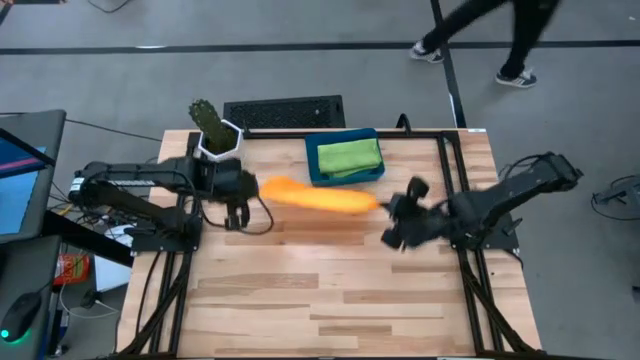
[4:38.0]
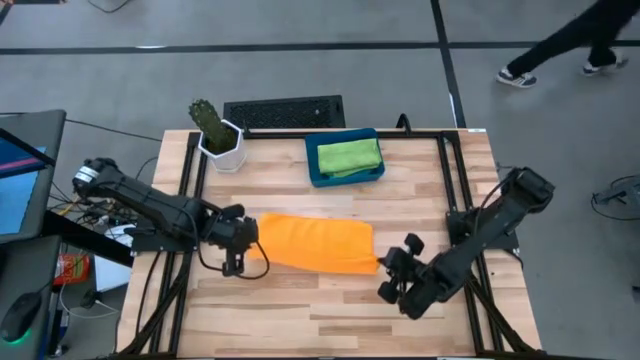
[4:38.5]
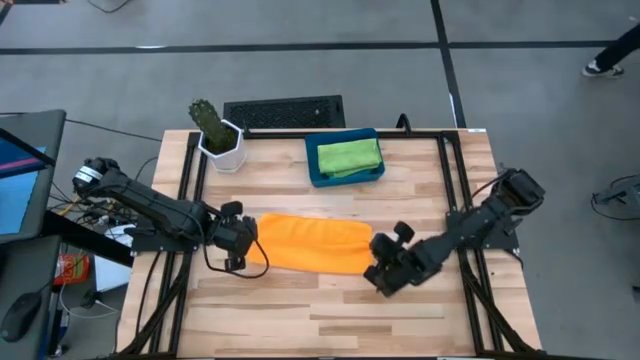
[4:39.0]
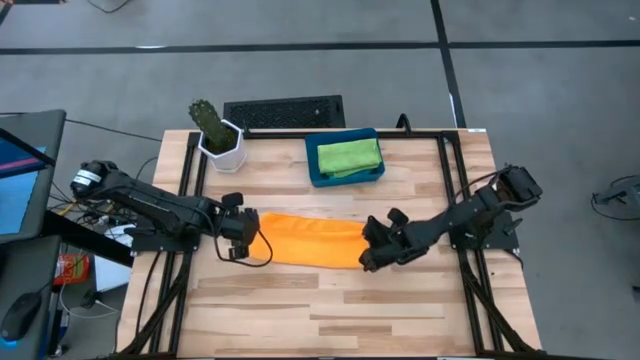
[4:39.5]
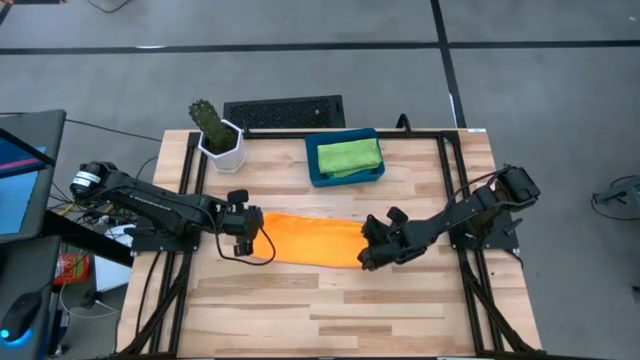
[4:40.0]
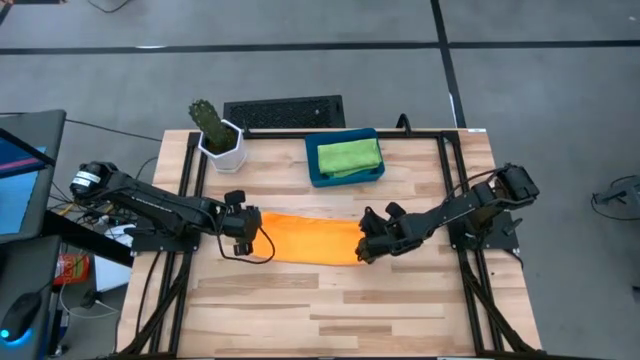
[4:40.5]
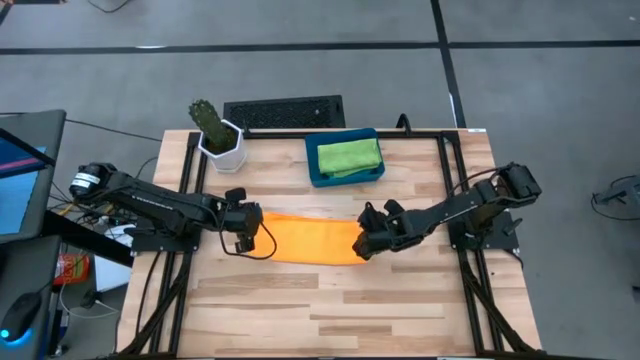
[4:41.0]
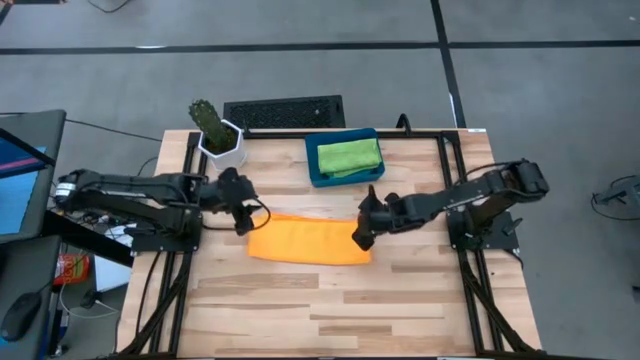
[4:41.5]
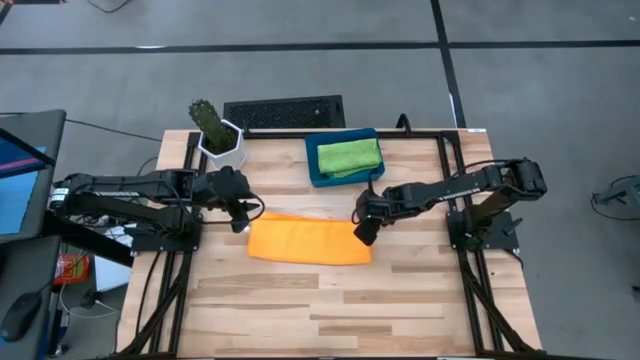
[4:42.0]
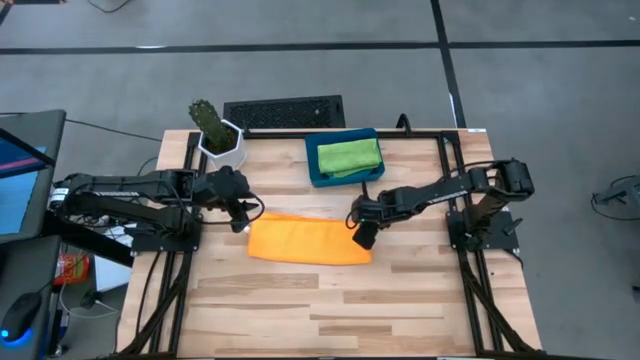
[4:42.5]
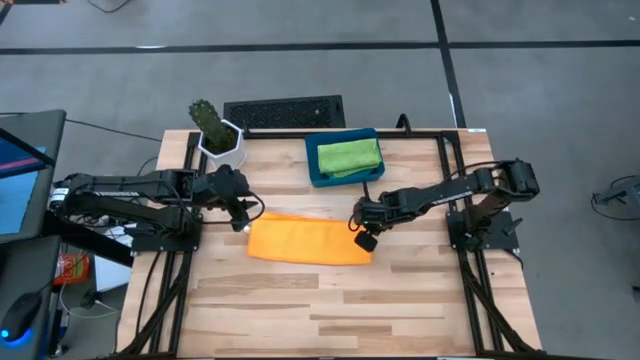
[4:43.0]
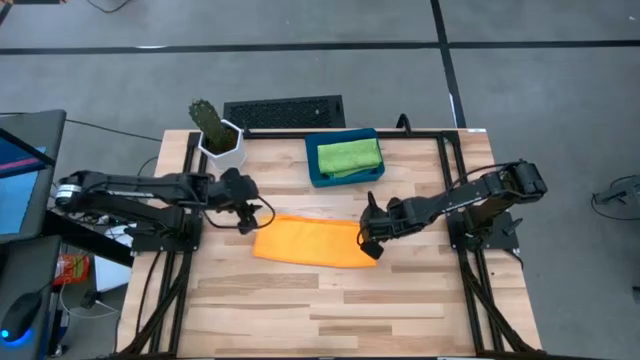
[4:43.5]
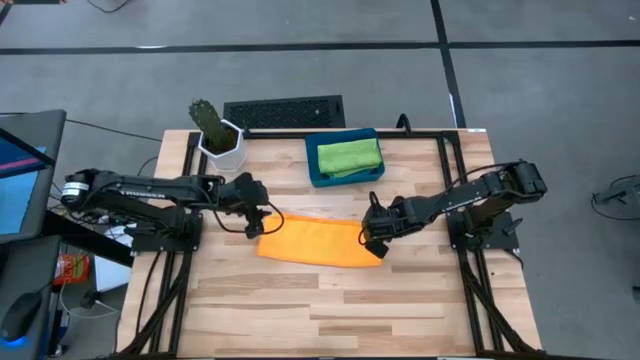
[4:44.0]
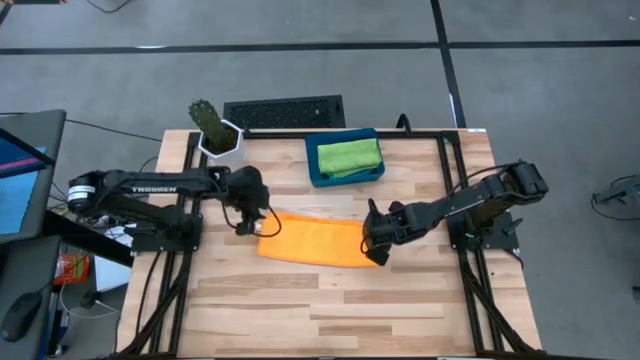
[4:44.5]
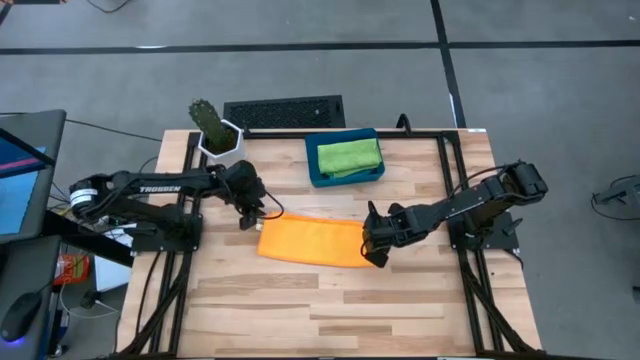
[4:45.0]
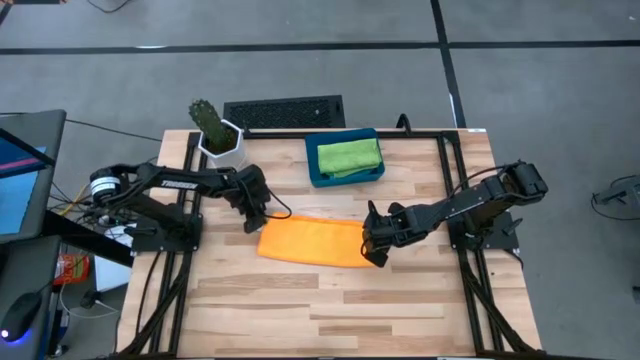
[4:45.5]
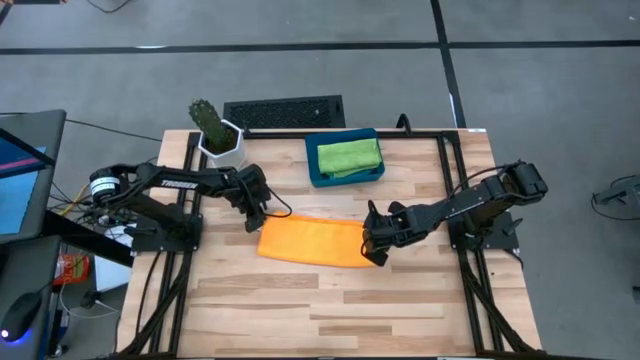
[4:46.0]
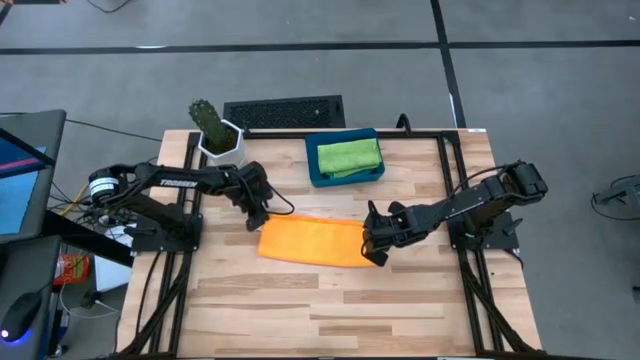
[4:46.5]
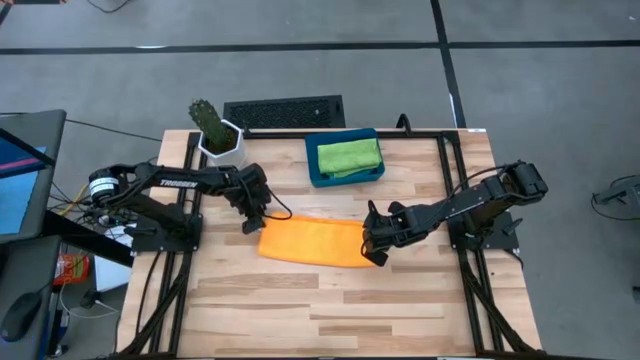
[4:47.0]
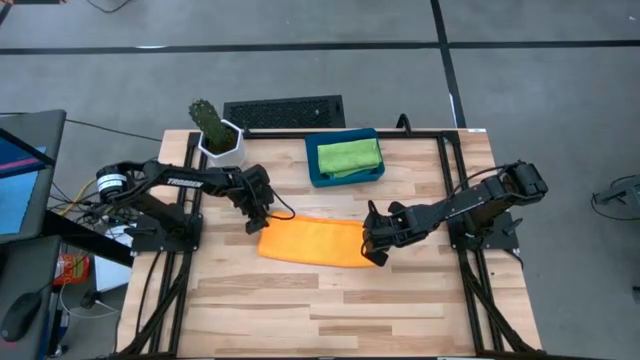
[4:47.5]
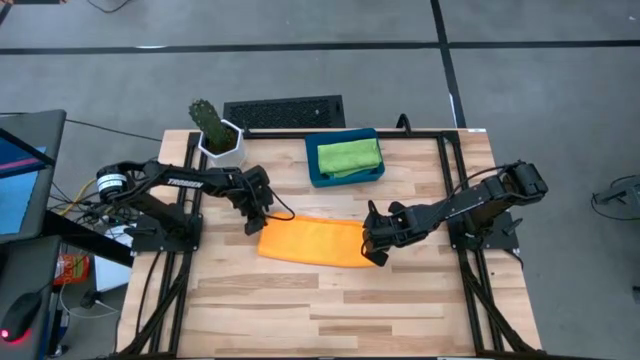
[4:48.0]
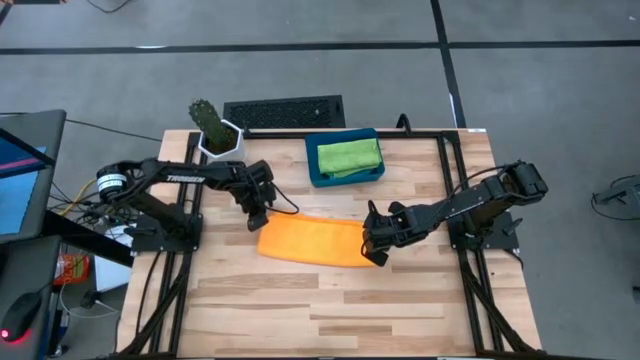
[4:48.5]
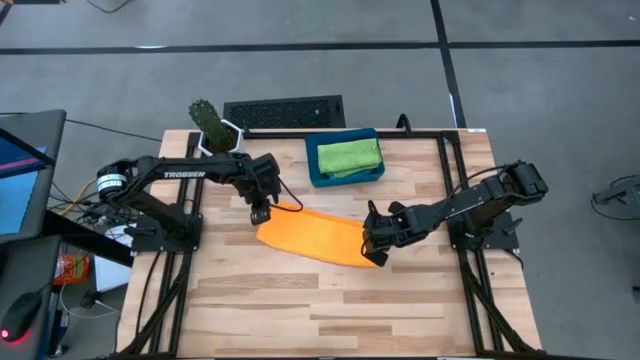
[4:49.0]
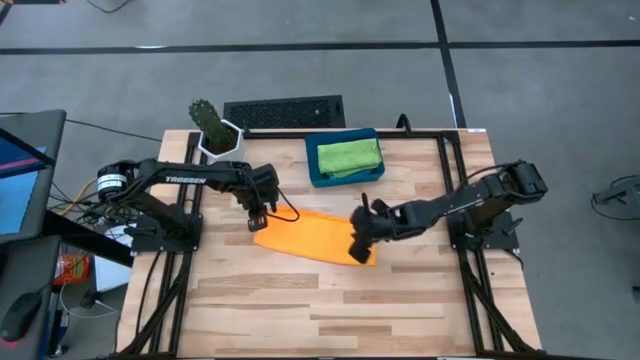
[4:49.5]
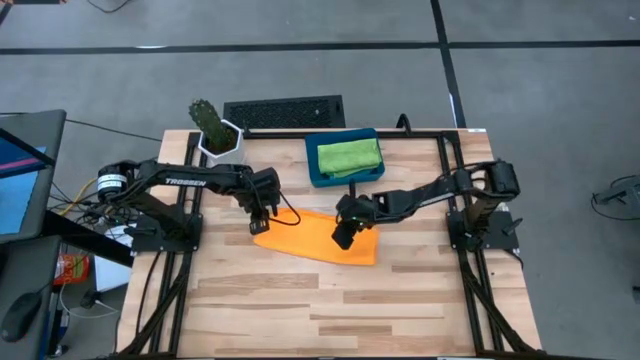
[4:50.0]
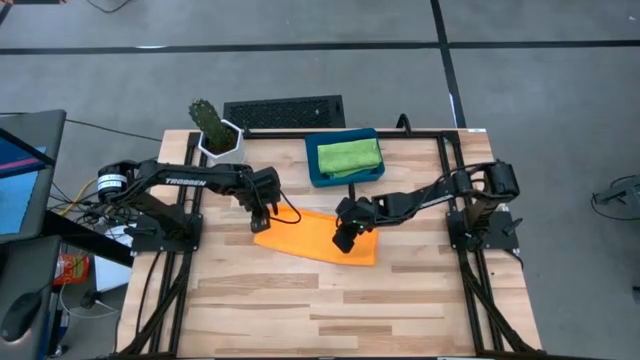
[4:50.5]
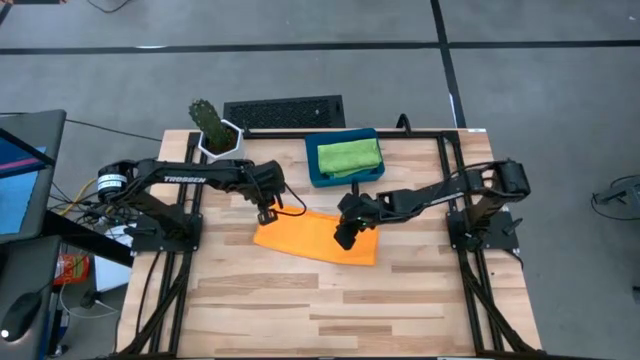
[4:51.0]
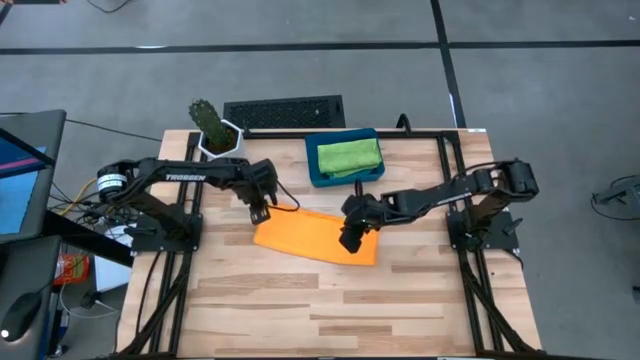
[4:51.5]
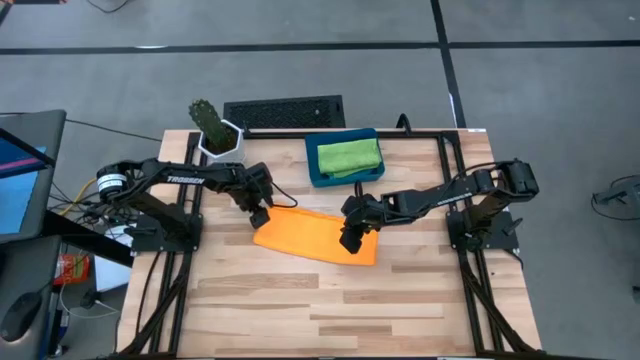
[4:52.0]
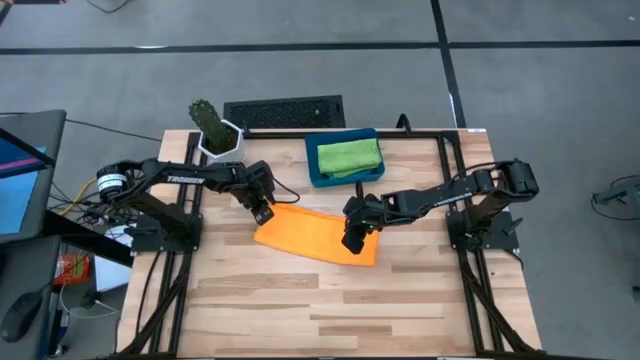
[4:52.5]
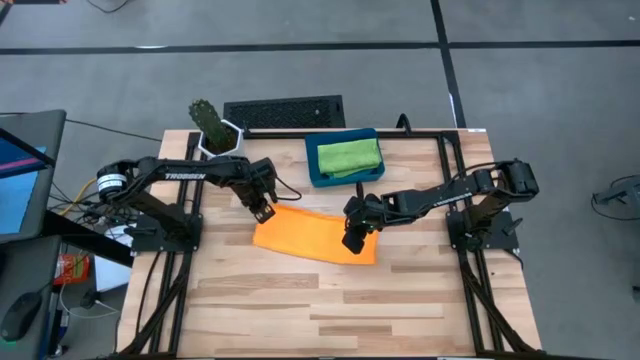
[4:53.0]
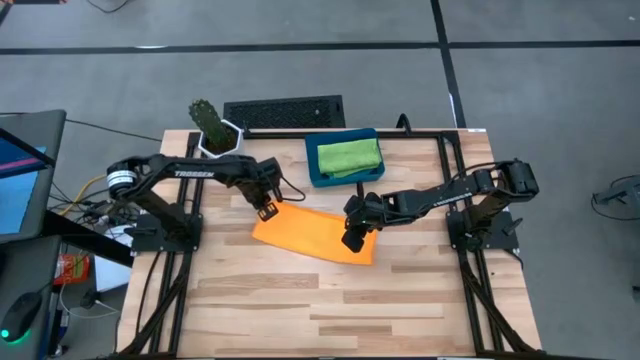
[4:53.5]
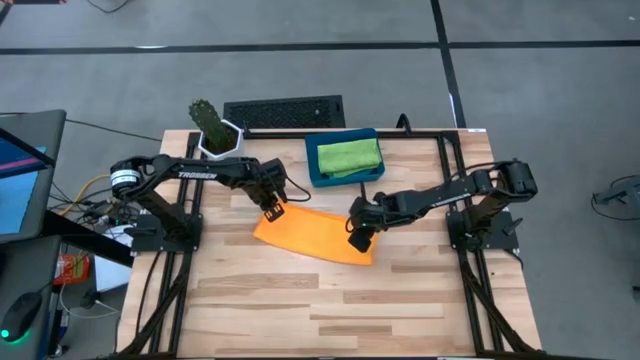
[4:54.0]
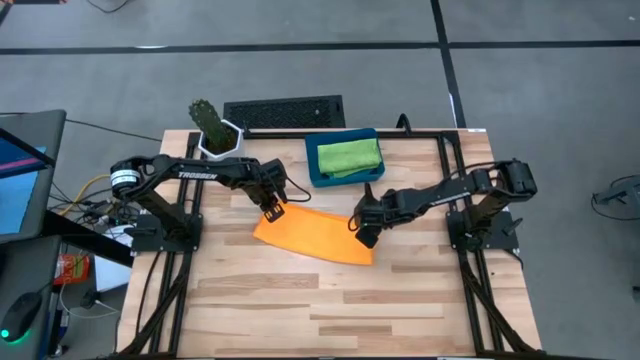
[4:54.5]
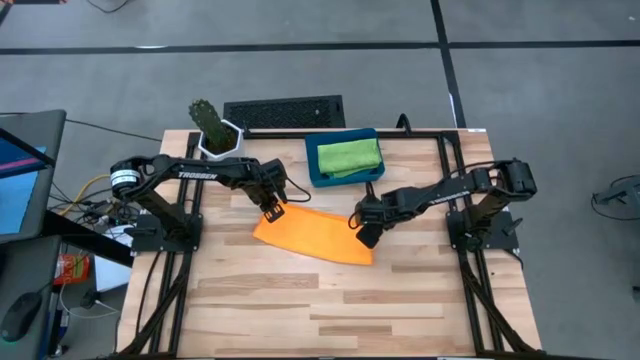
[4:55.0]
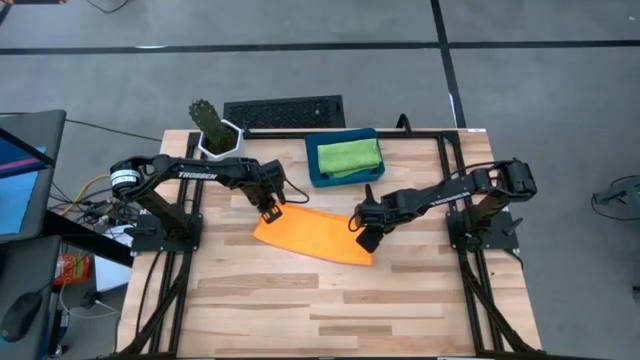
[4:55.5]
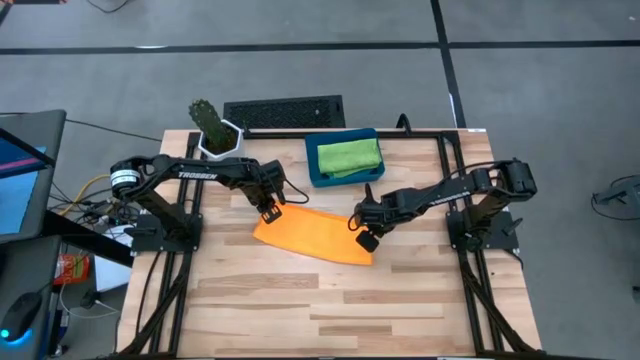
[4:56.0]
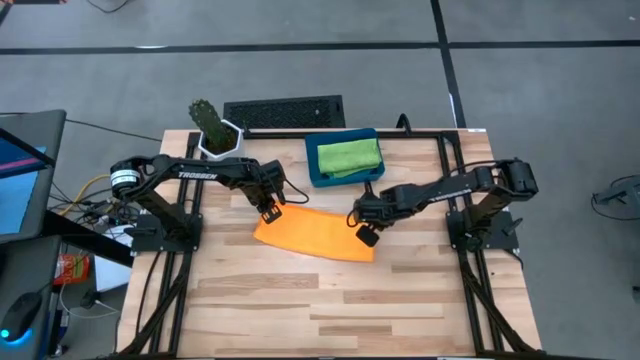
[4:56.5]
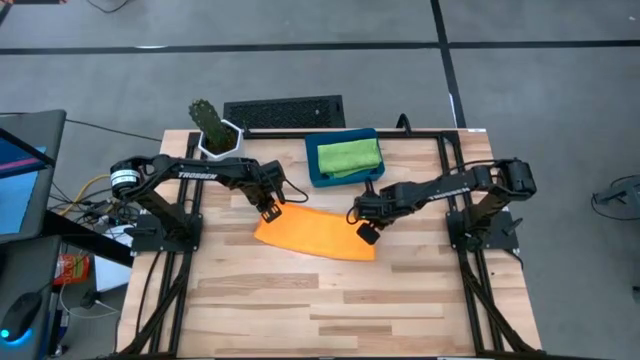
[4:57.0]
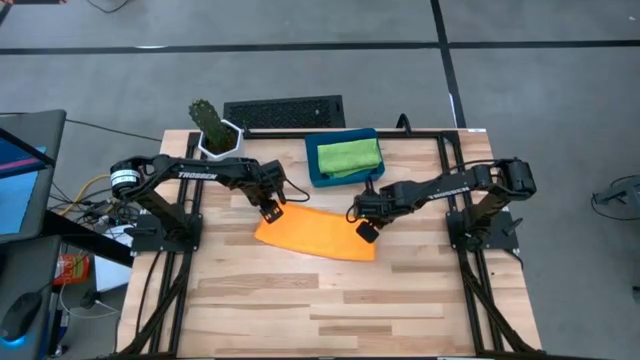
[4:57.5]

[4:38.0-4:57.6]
Task: Fold microfiber towels
Fold the orange microfiber cloth
